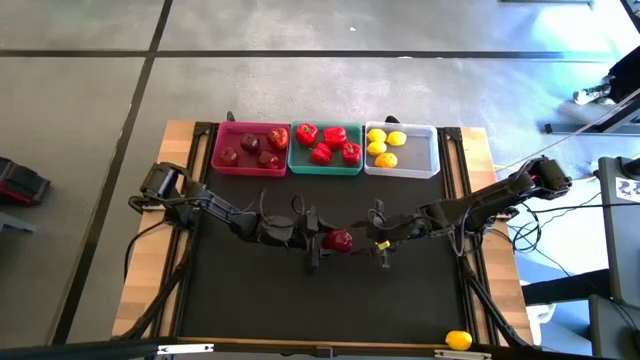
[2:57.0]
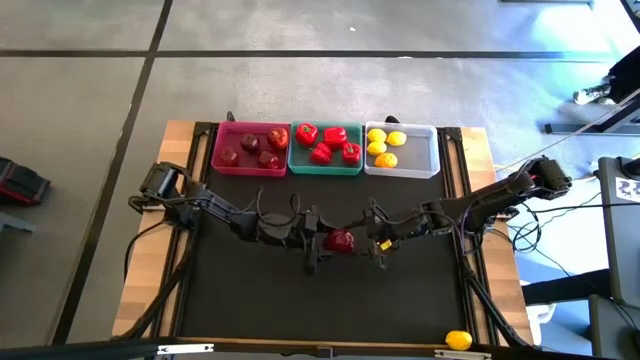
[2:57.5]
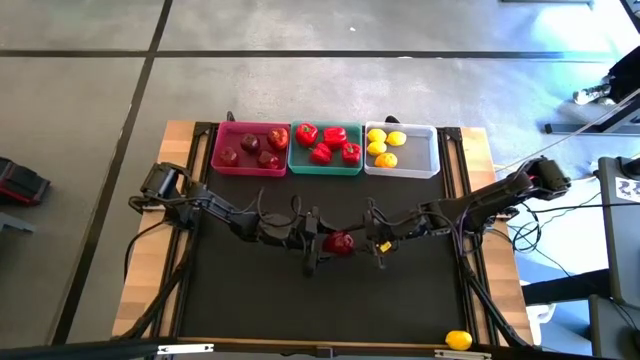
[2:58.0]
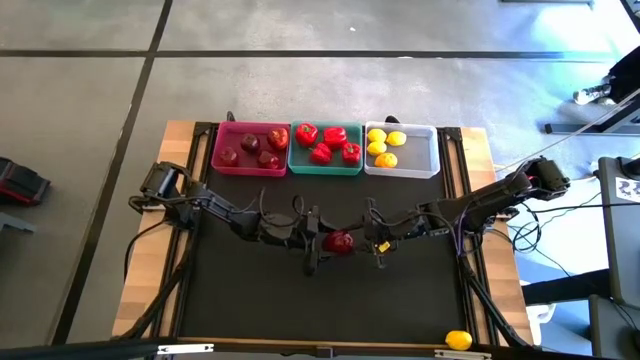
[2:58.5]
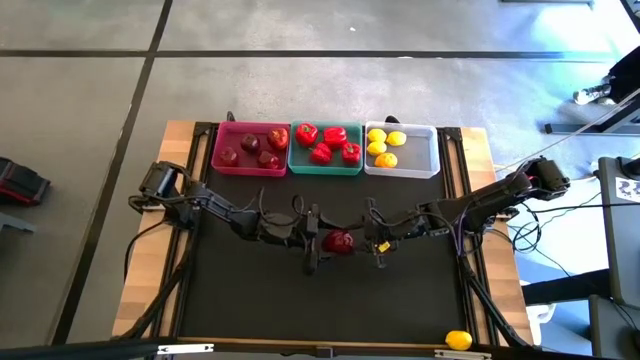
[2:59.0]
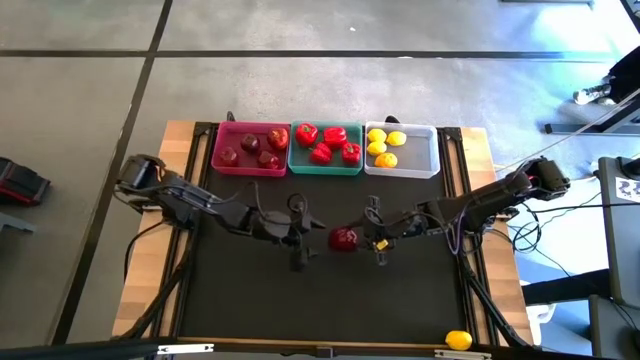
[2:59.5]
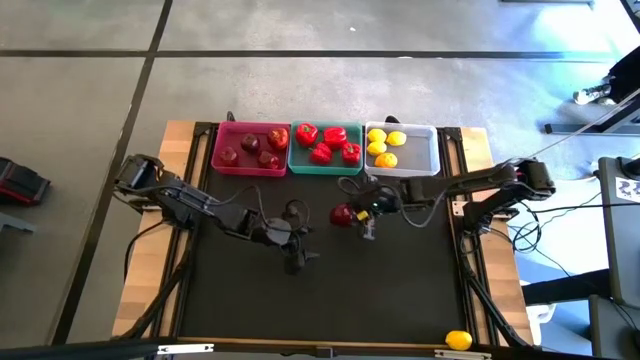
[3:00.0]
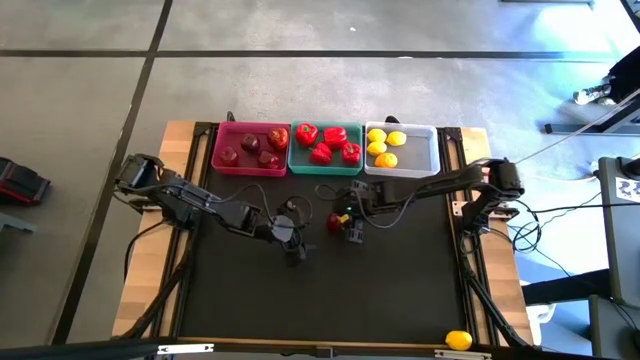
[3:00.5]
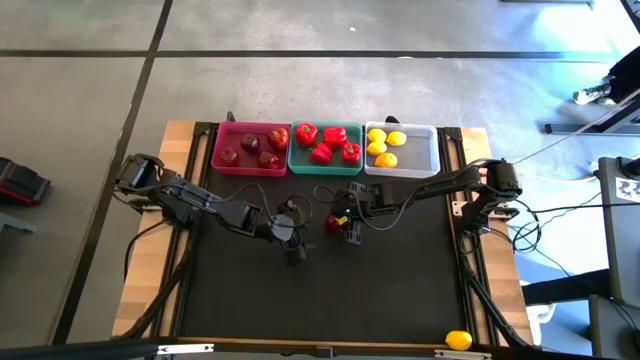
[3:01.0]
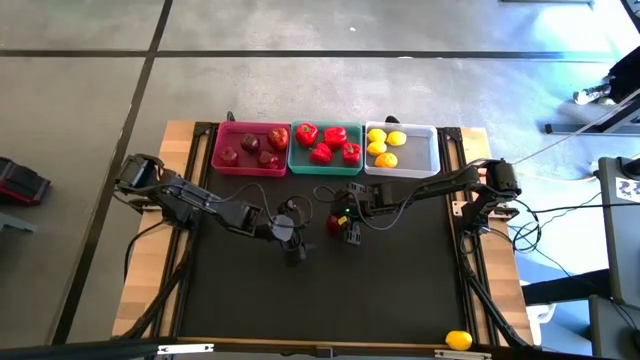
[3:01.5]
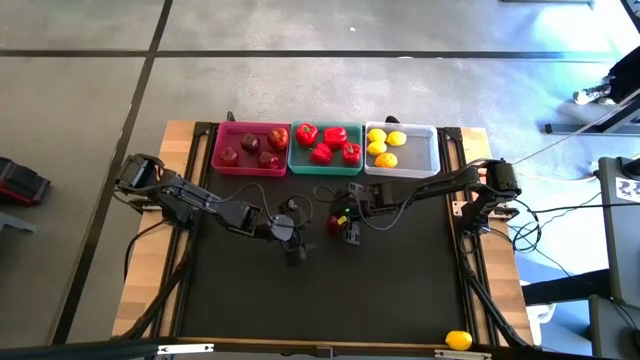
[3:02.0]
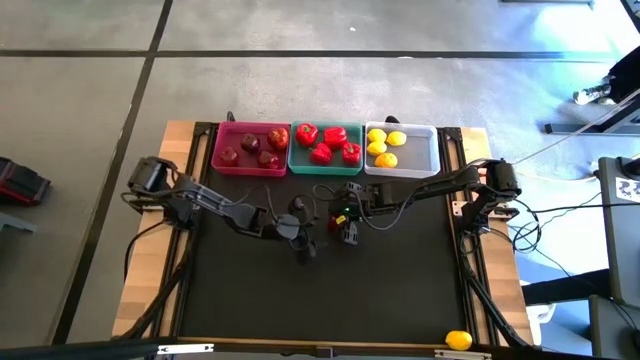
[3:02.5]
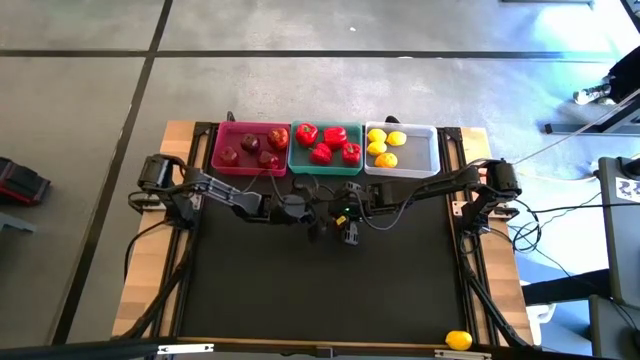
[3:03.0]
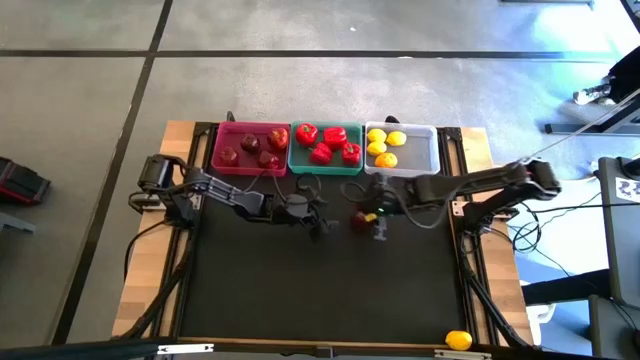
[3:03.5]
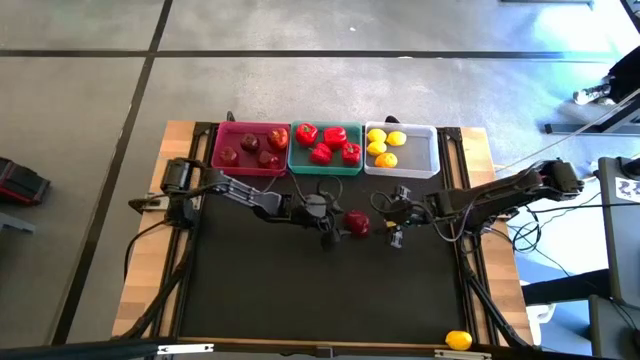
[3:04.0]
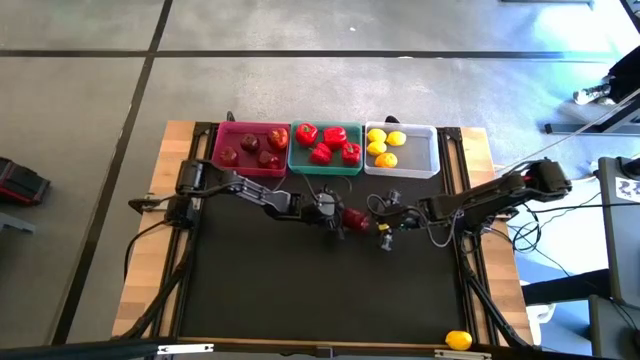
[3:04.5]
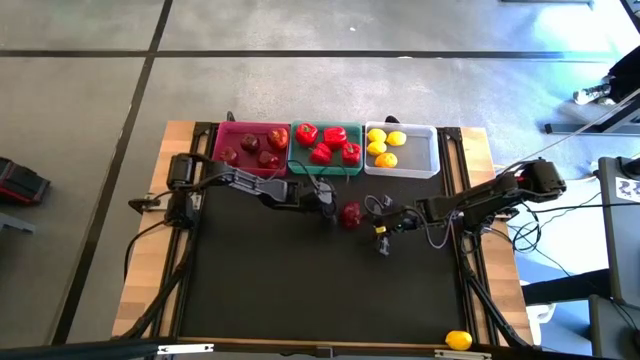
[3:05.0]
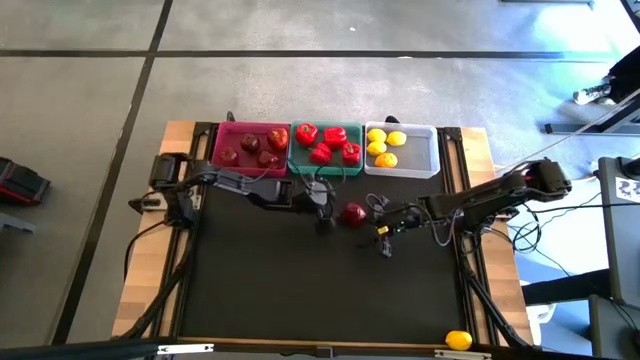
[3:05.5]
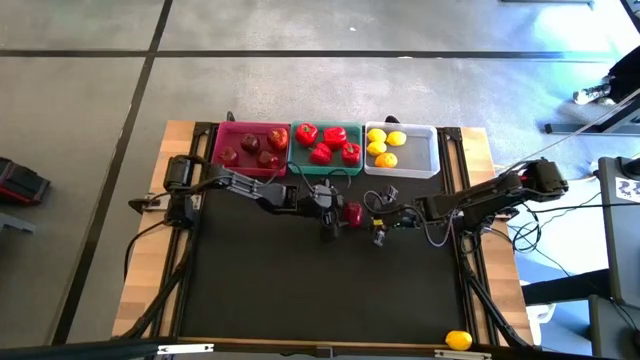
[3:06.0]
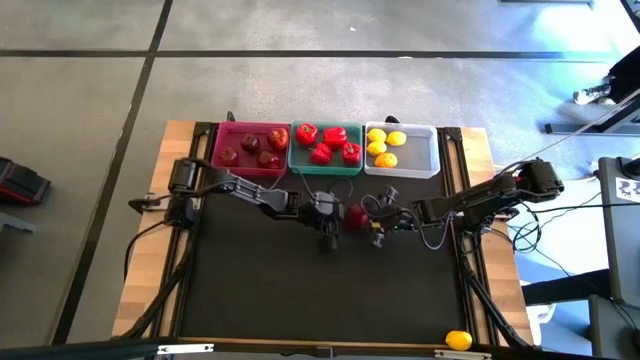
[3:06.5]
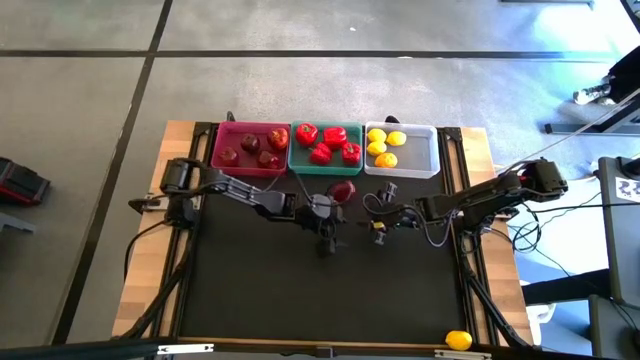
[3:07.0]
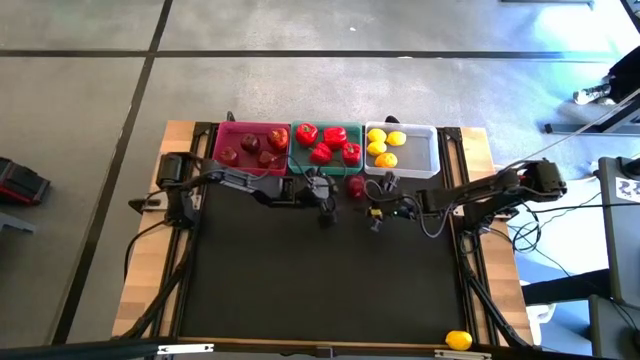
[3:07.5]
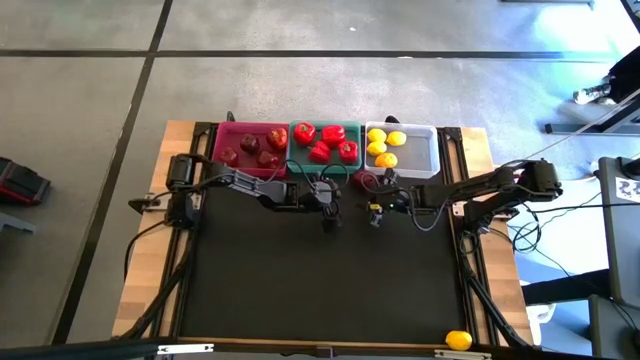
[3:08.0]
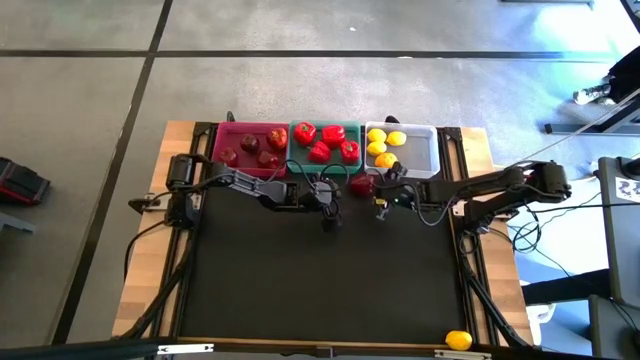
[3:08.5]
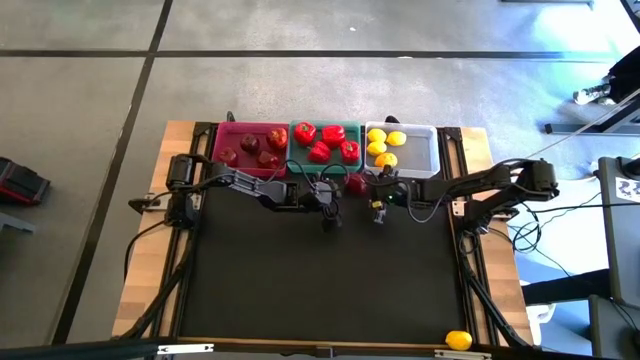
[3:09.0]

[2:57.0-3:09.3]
Task: Sort produce into baskets
Put the apple into the pink bin

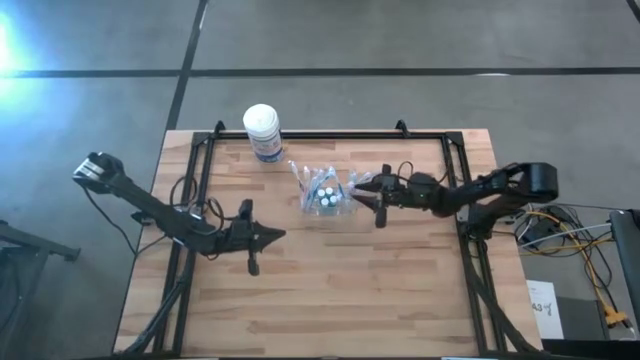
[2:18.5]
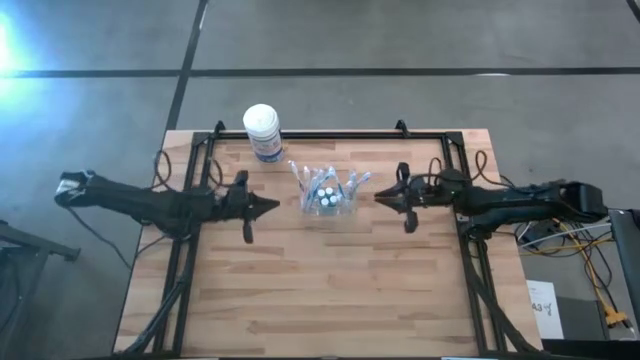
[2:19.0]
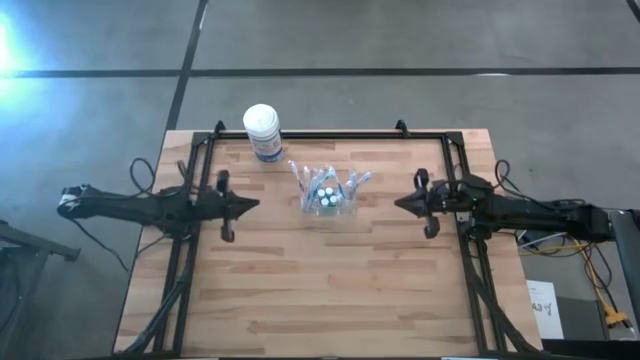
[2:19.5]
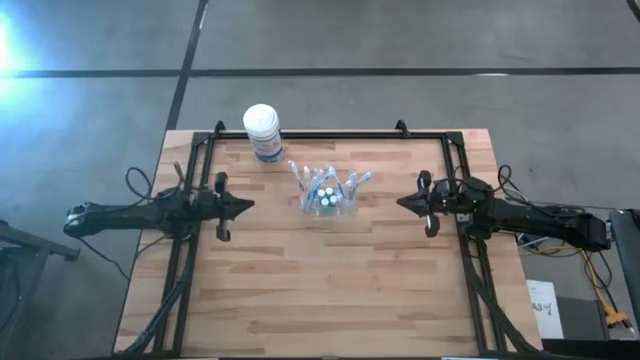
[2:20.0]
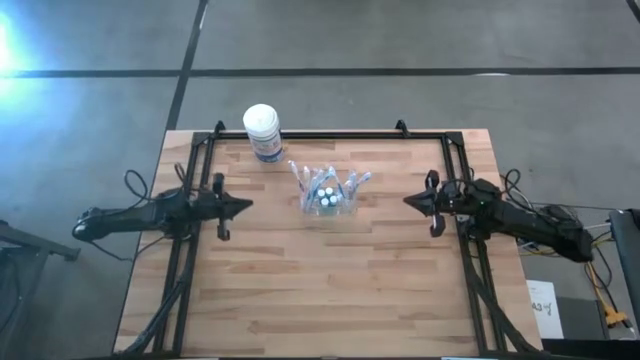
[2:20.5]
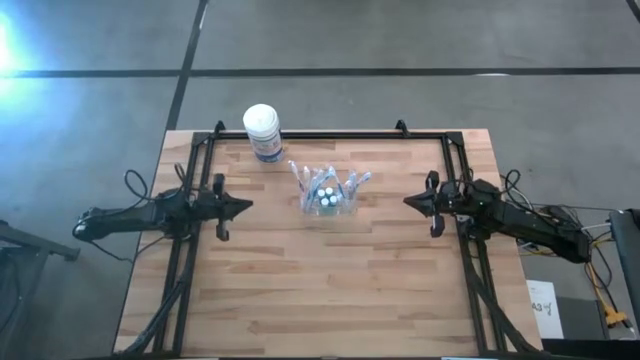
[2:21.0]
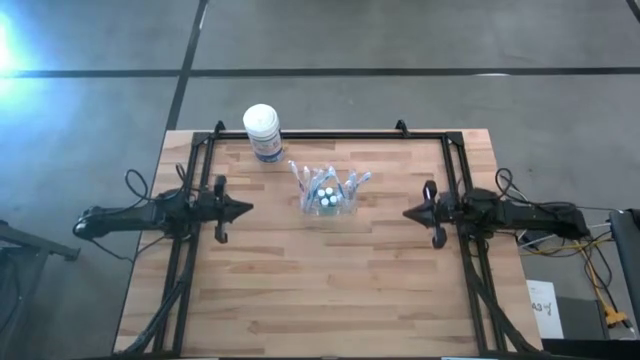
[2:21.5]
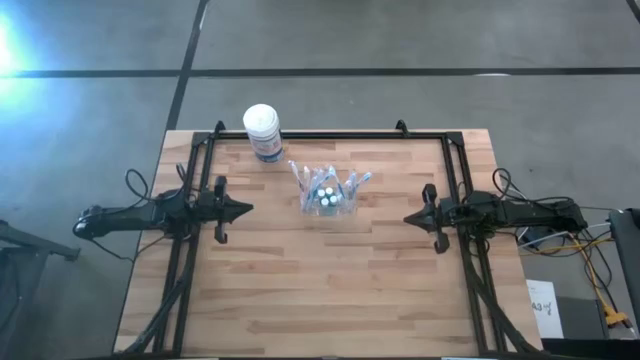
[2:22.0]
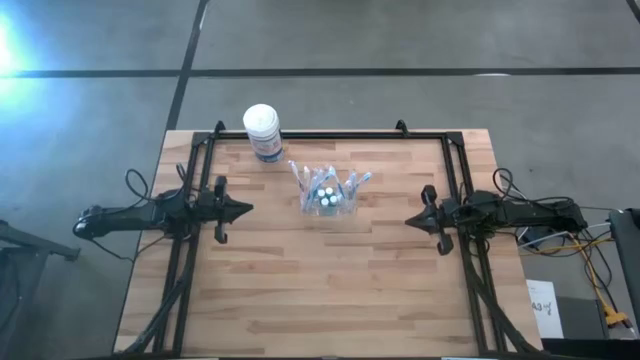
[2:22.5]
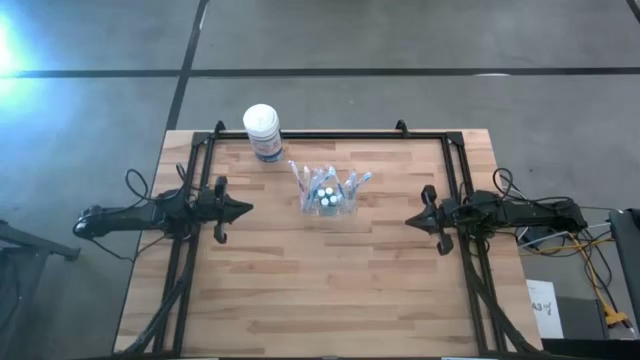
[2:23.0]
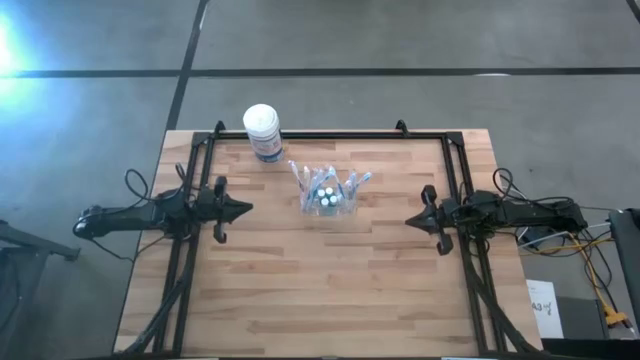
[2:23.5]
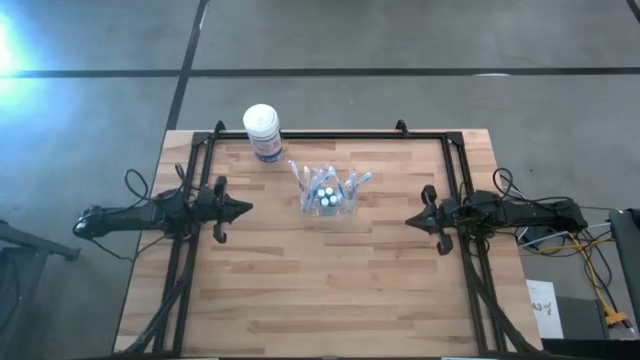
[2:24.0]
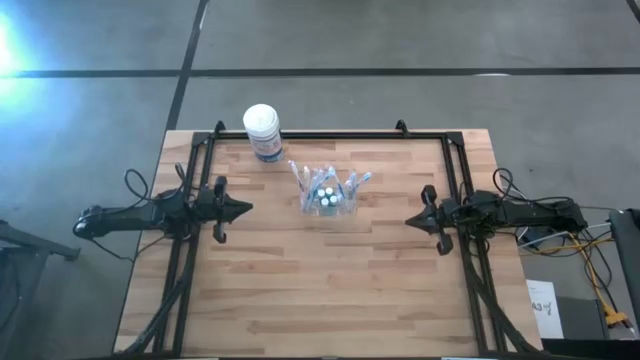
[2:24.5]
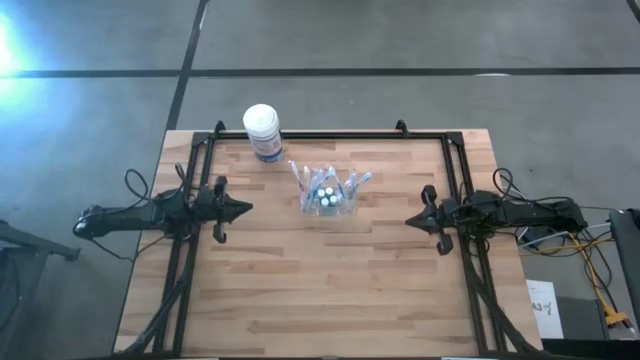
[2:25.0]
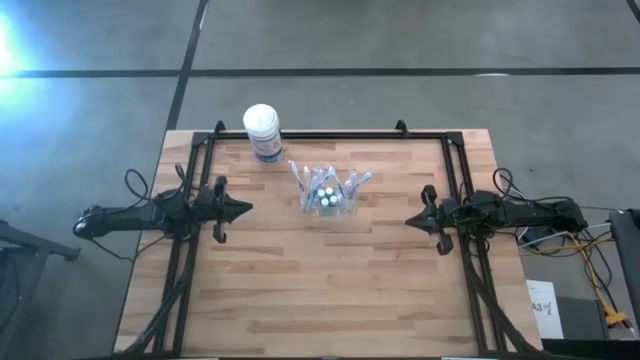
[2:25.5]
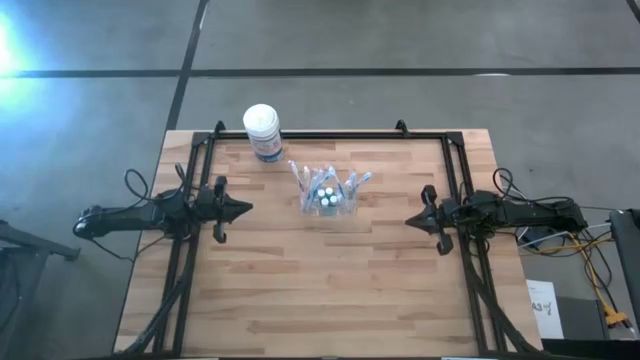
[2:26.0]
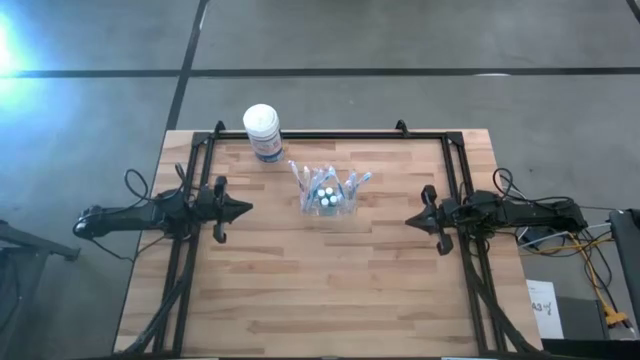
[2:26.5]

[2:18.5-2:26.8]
Task: Pick & Place toothbrushing station
Return to Home Position
